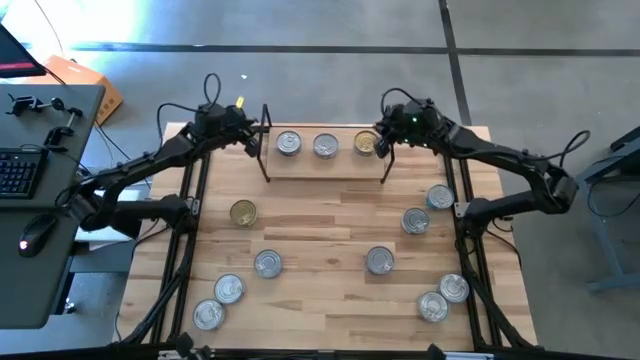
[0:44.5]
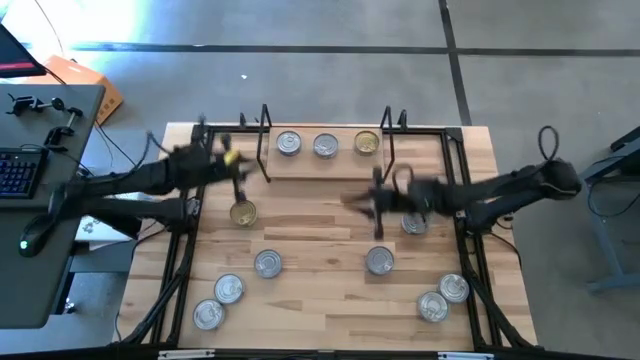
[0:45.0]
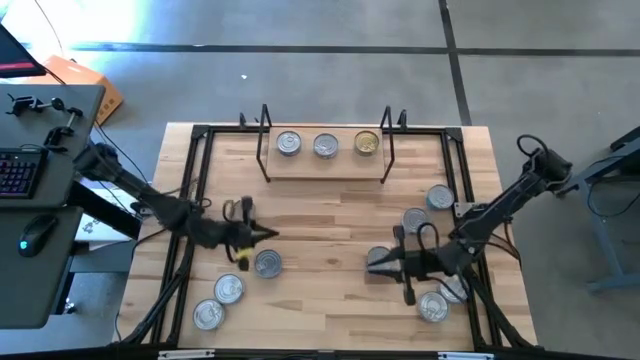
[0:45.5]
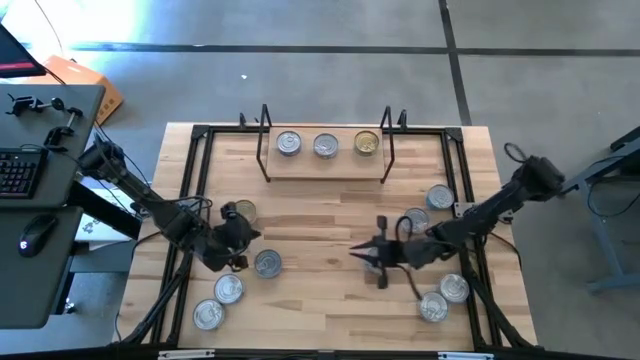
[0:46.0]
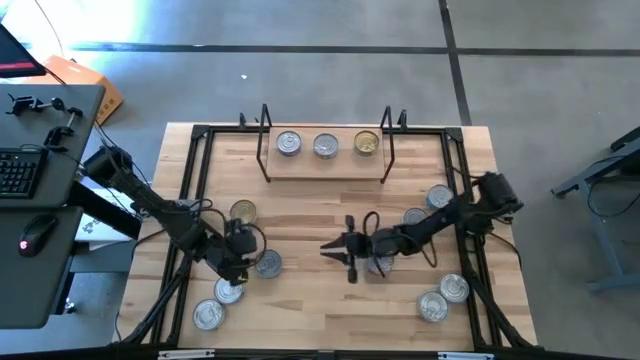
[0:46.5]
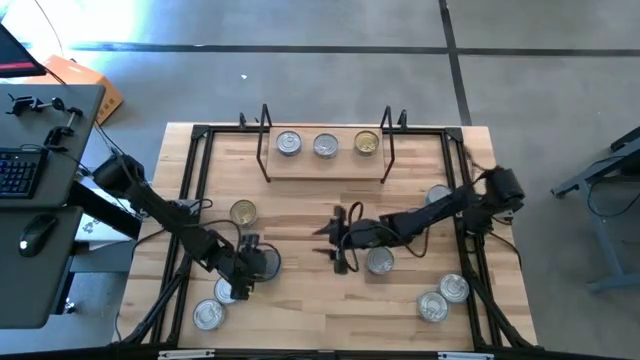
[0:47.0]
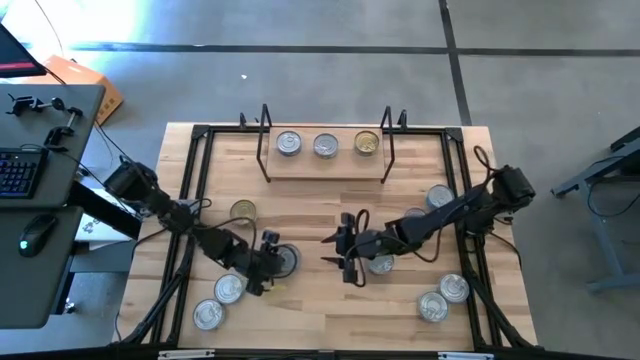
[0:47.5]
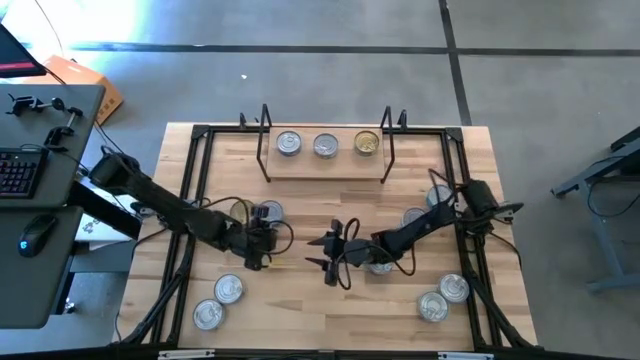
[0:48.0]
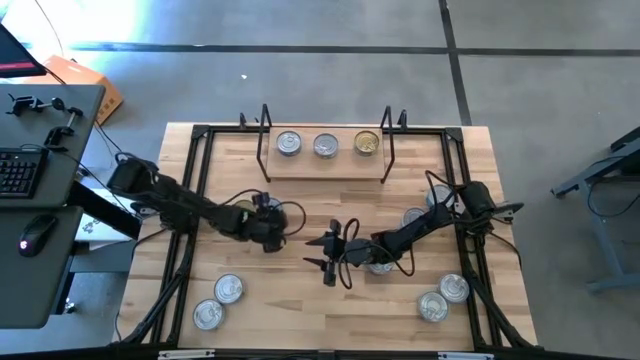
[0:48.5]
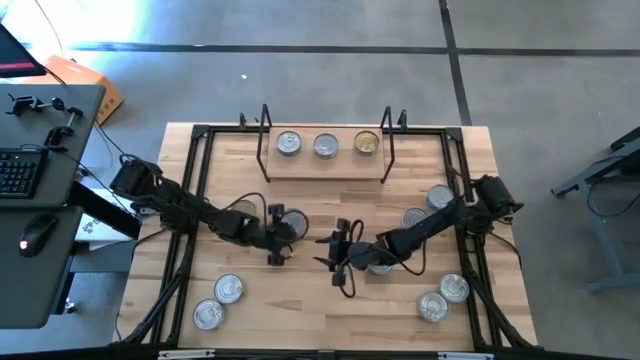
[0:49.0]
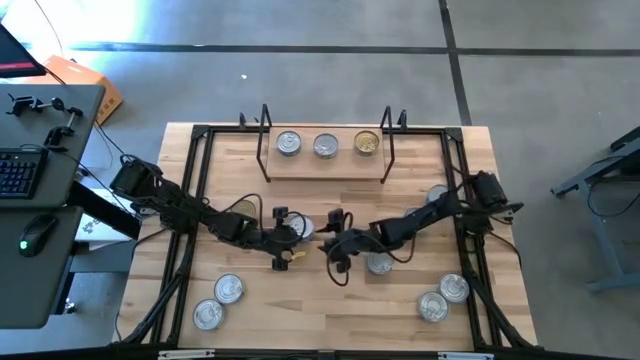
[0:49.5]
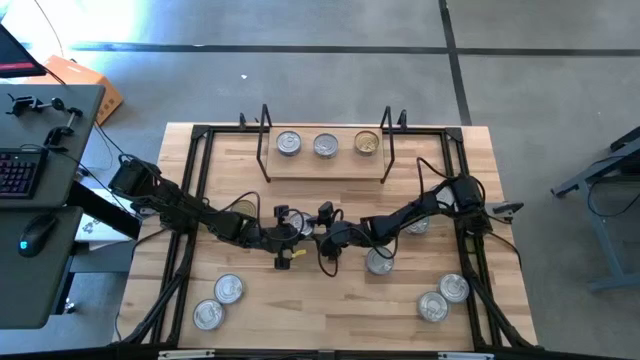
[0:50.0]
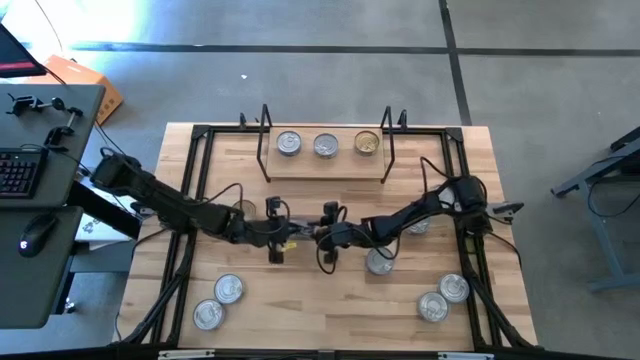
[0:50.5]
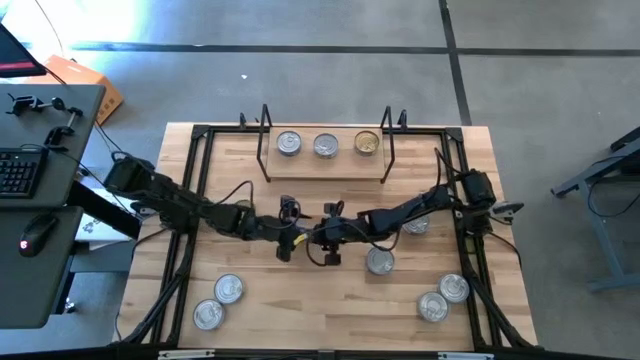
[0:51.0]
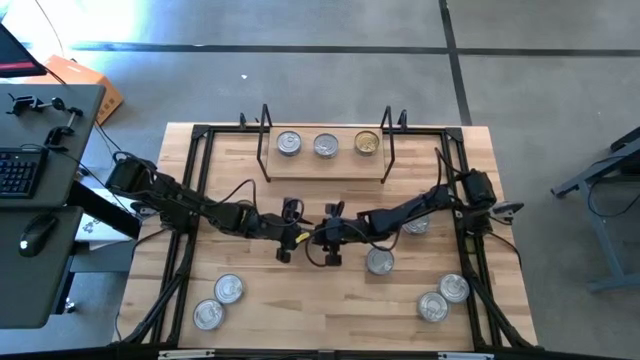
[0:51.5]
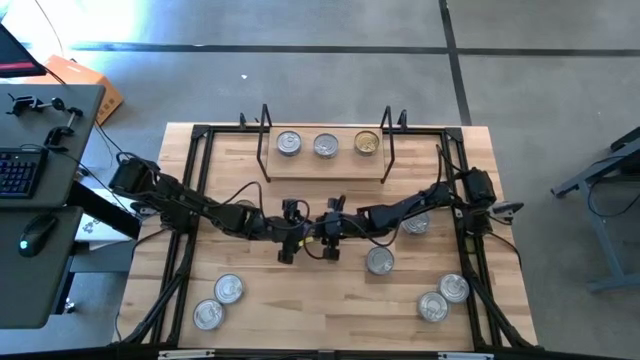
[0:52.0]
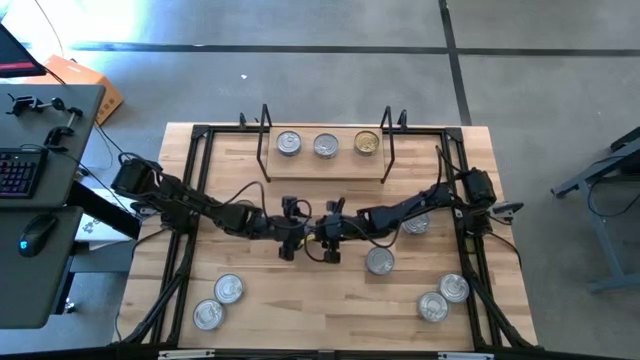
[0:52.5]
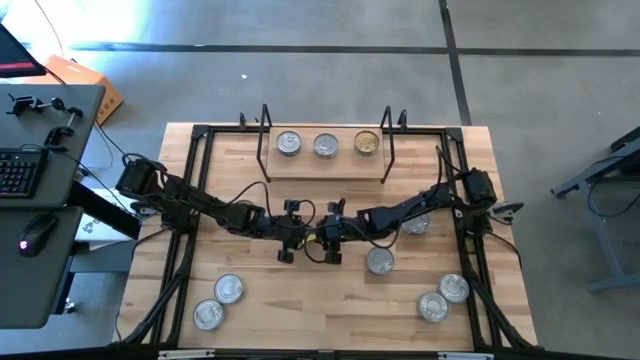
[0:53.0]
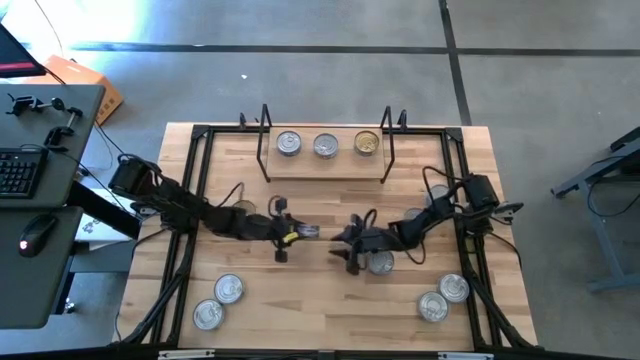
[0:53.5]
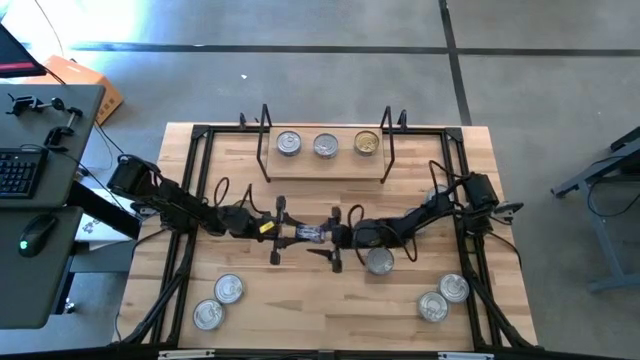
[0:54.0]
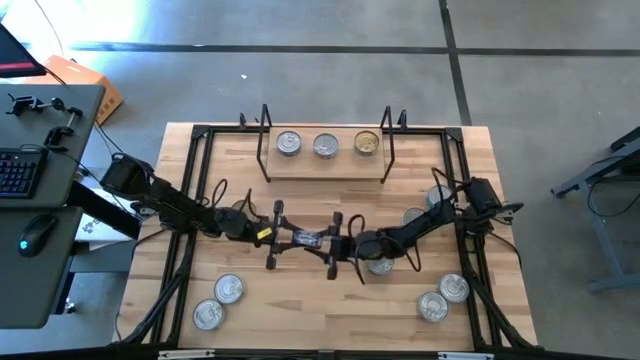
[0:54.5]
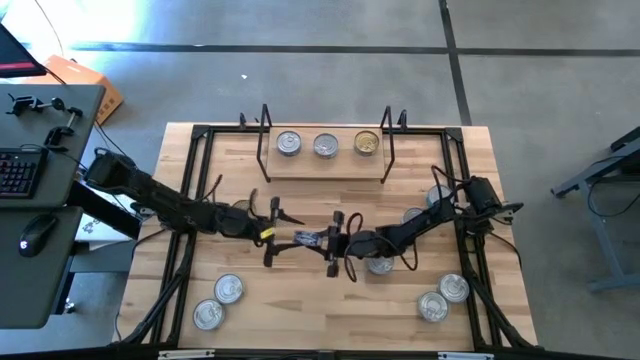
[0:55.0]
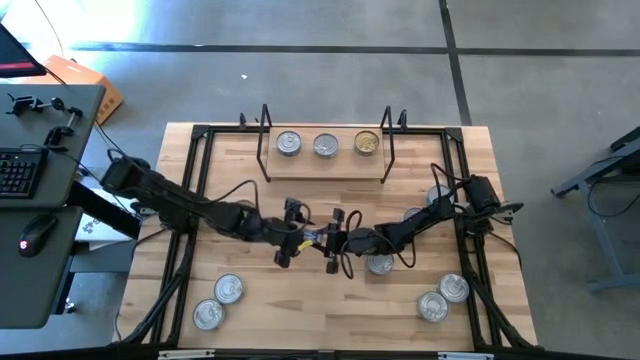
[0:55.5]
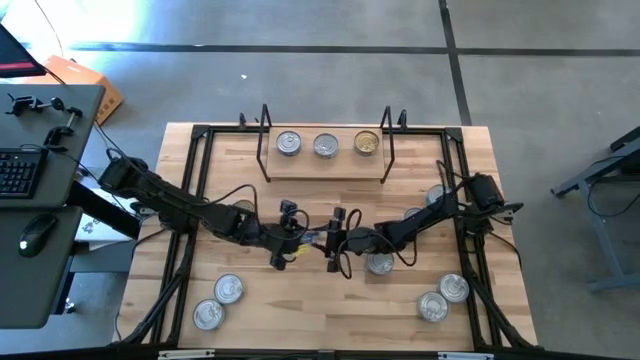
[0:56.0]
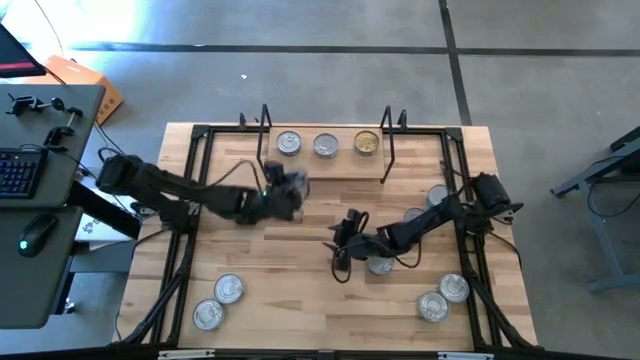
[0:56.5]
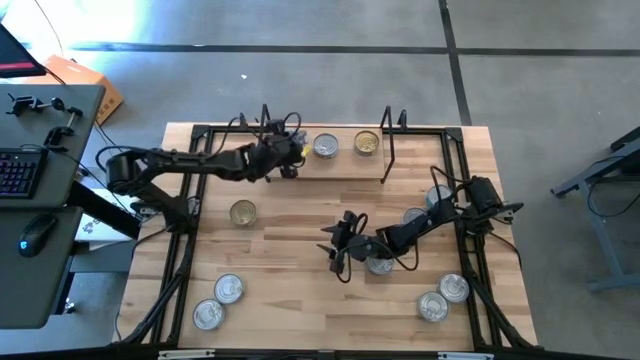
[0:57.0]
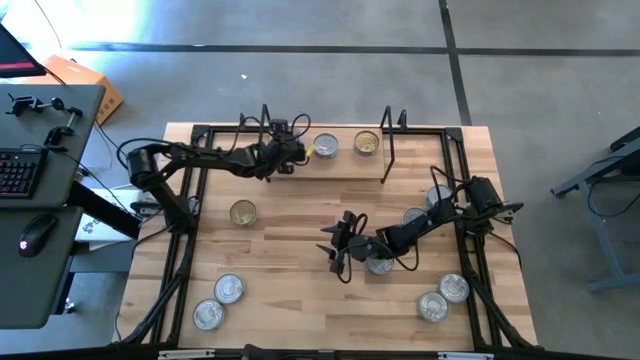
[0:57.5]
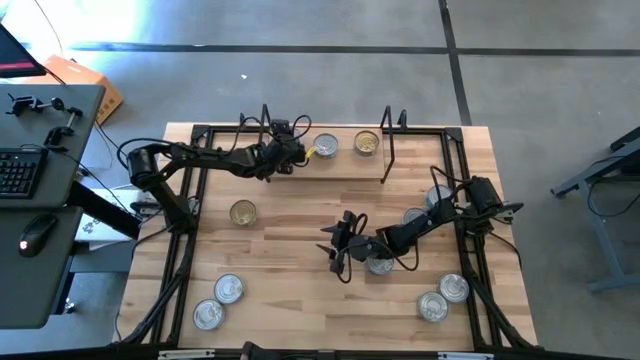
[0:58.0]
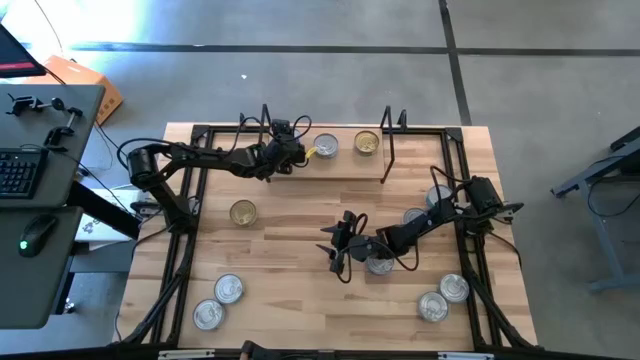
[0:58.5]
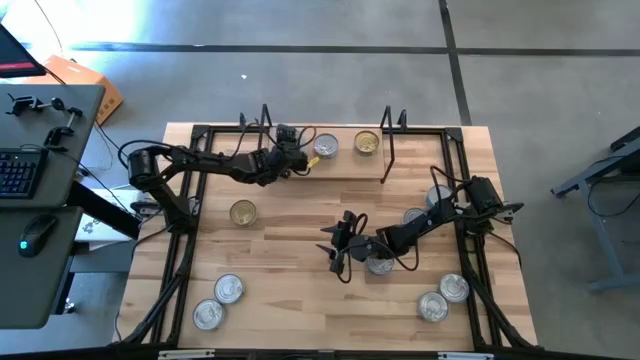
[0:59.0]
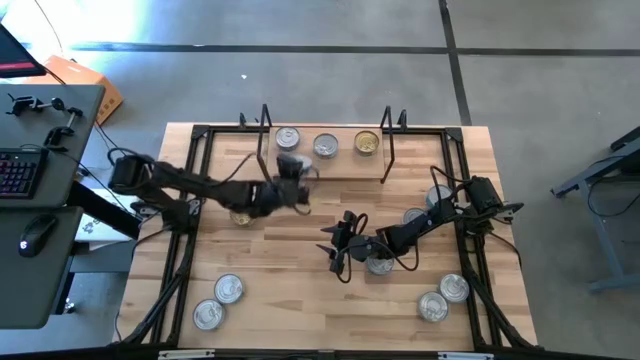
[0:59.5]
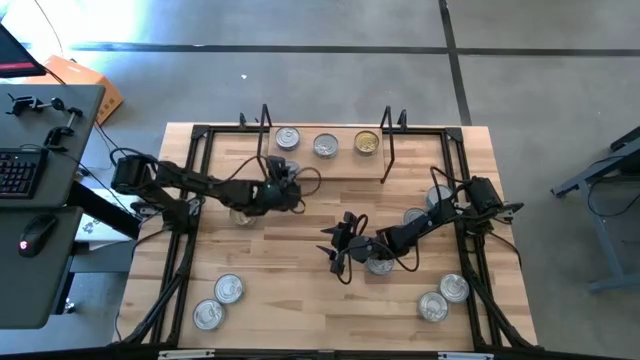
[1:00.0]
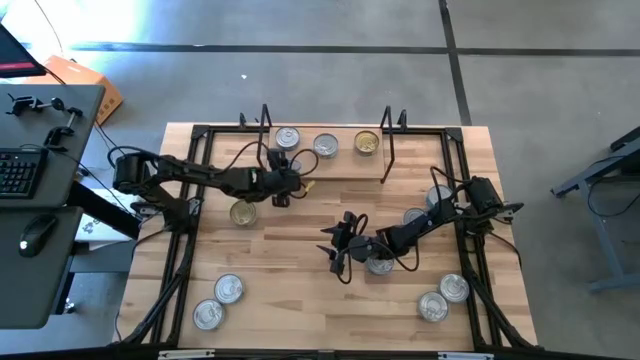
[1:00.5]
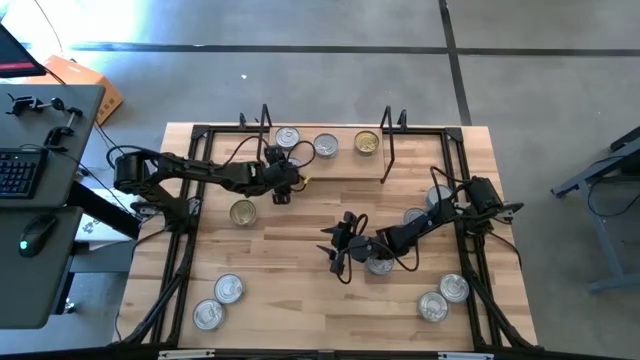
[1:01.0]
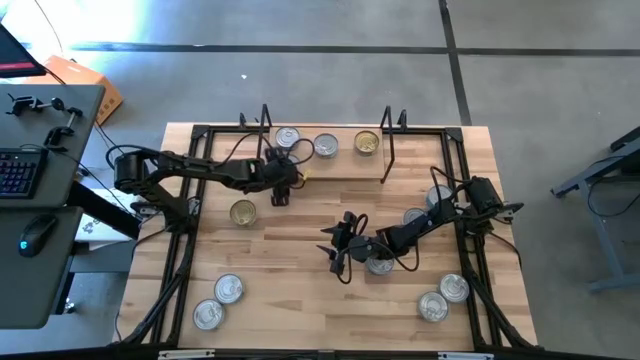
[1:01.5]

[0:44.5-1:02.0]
Task: Stack canned seafood by type on shelf
Put the blue tuna can on the shelf aligned with the other blue tuna can

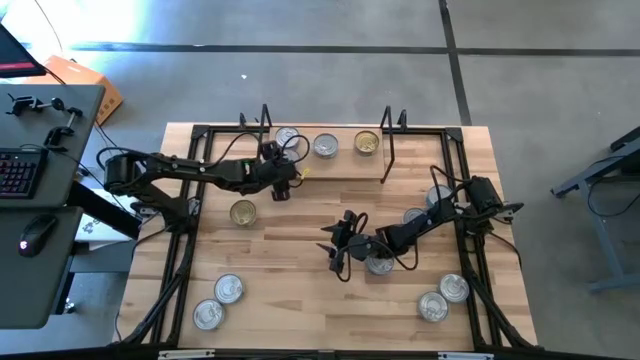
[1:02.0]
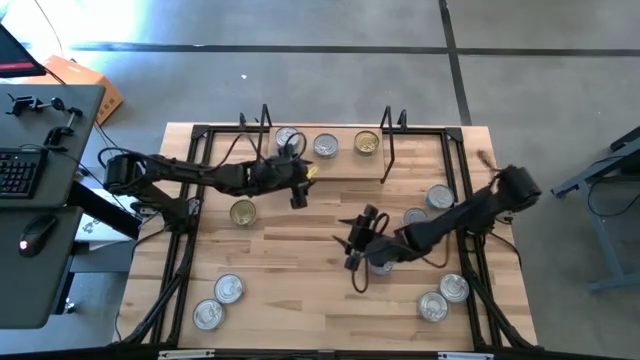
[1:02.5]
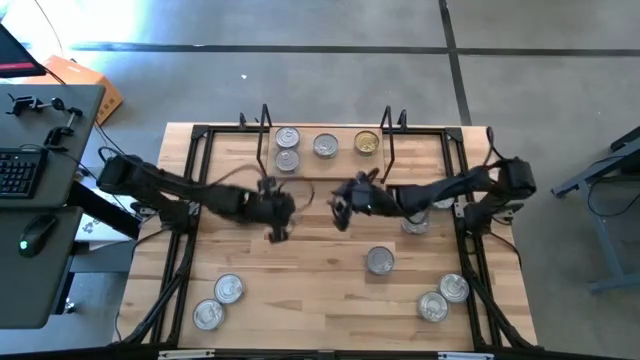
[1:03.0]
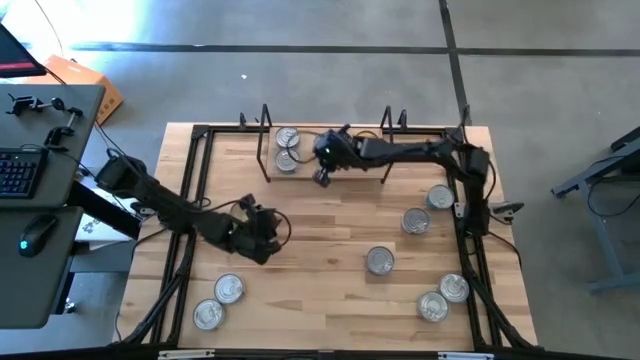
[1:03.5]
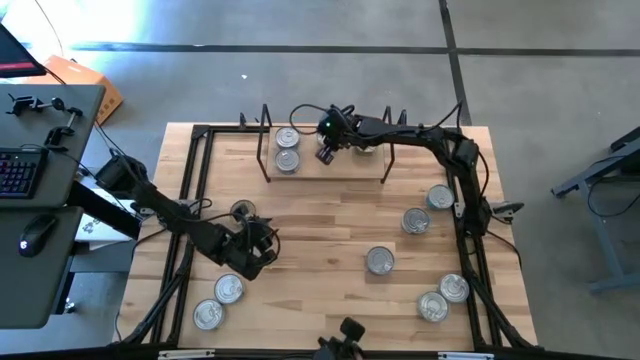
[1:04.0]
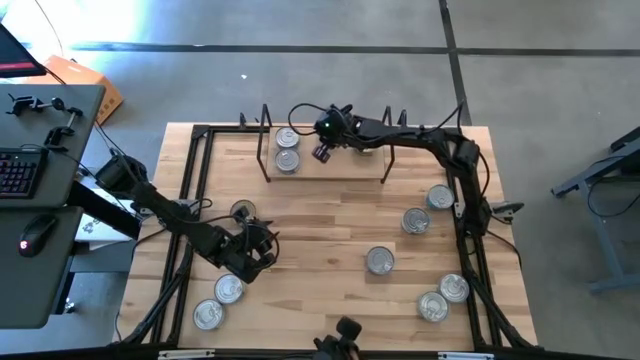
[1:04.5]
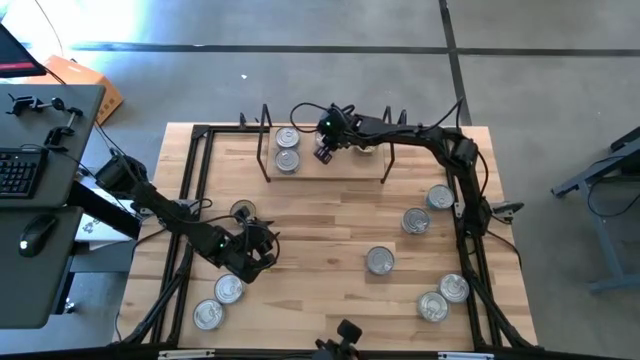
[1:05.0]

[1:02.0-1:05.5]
Adjust the yellow-blue tuna can on the shelf
